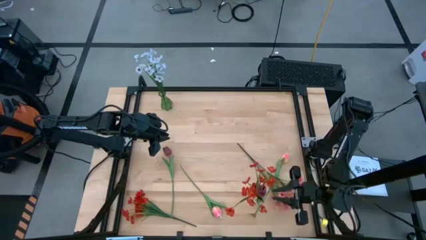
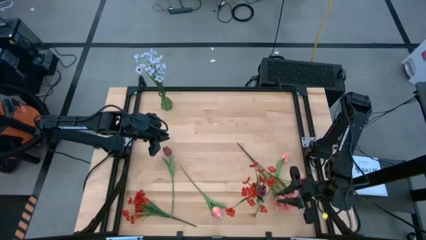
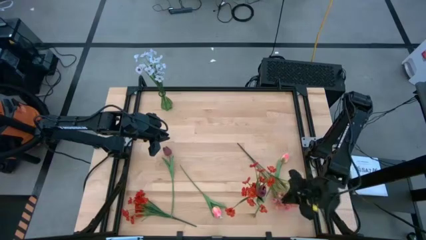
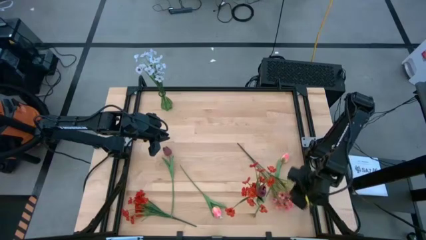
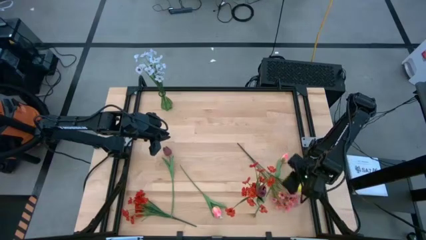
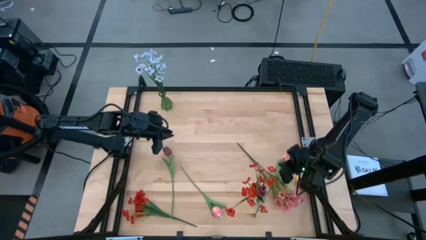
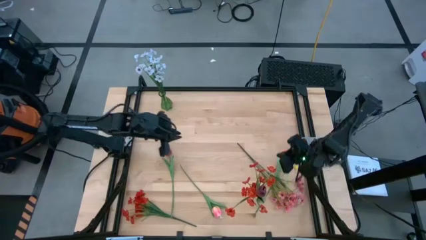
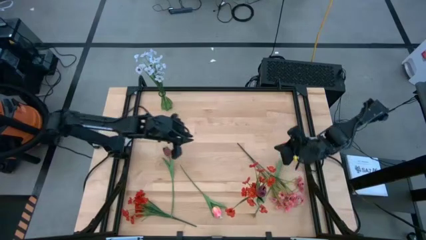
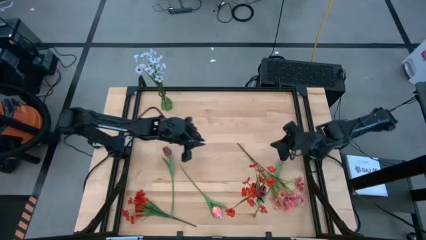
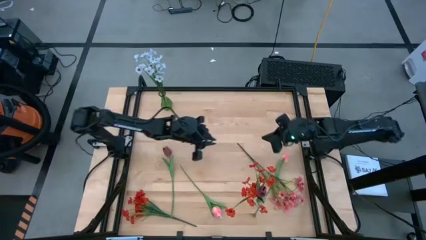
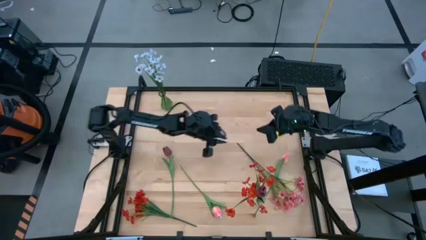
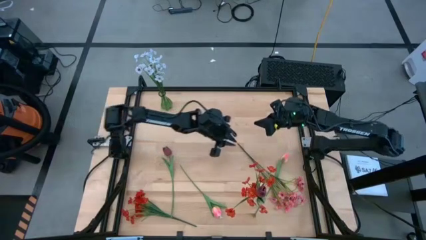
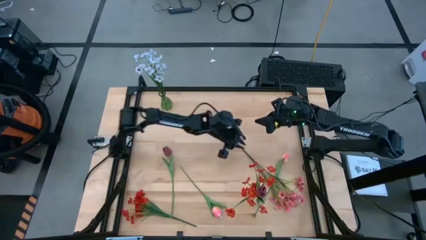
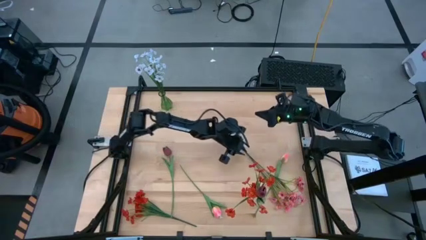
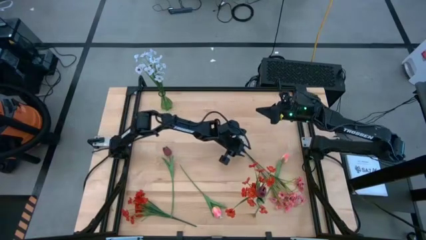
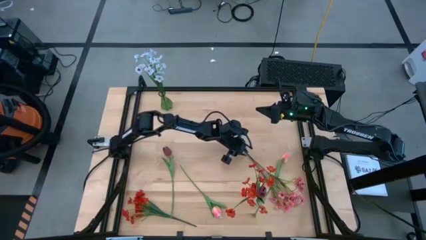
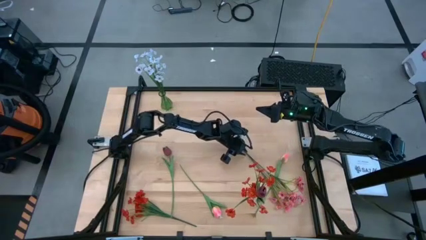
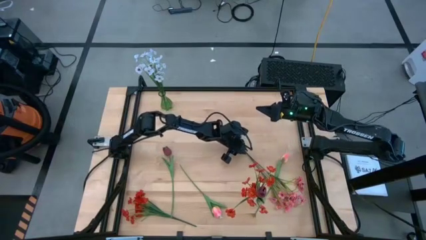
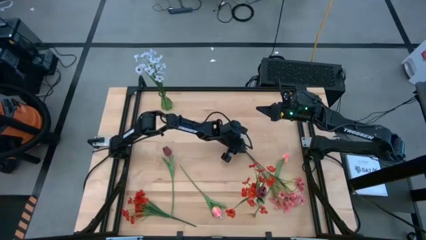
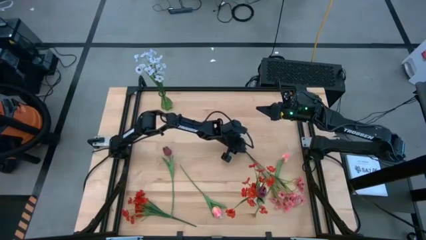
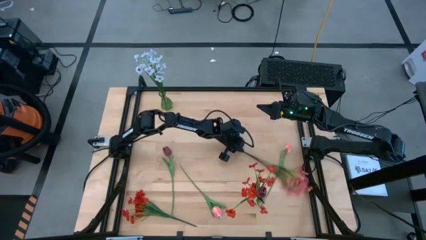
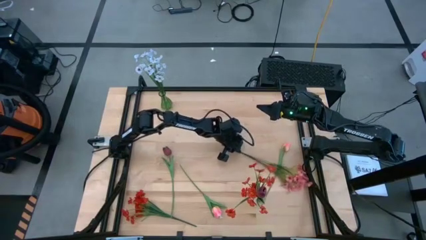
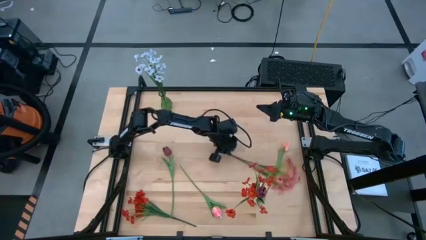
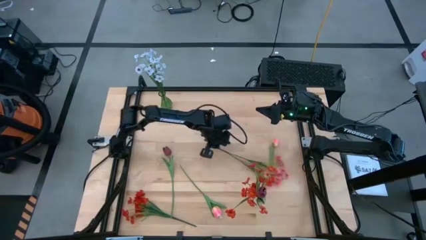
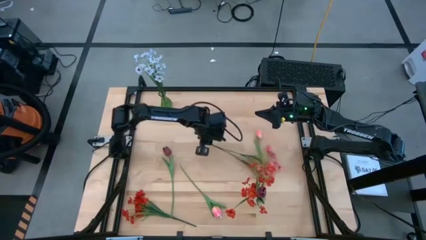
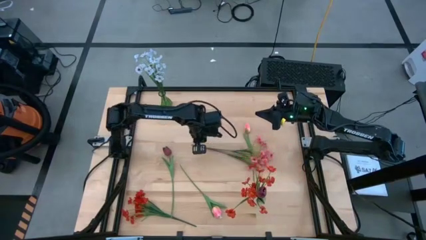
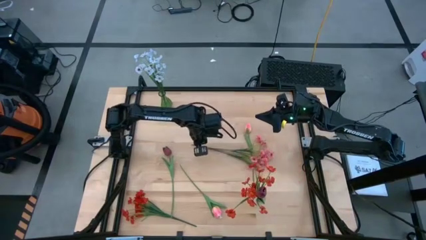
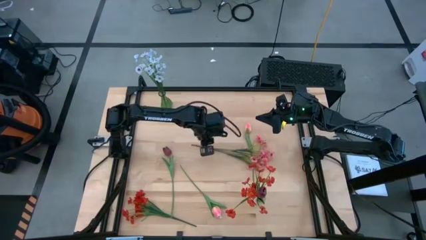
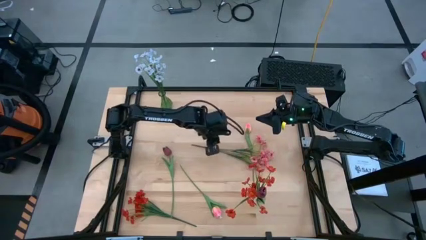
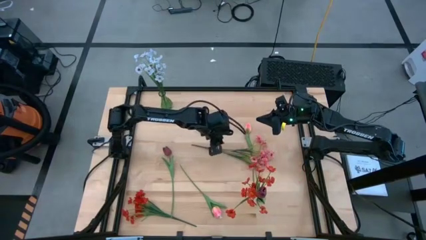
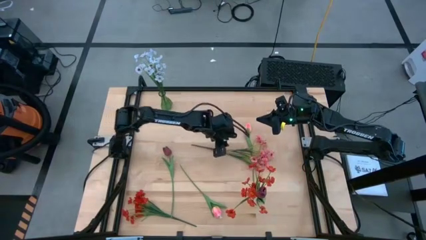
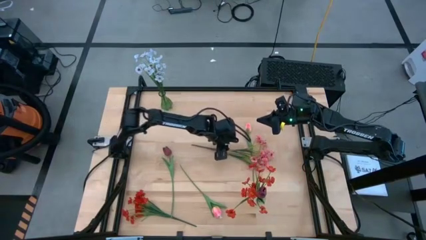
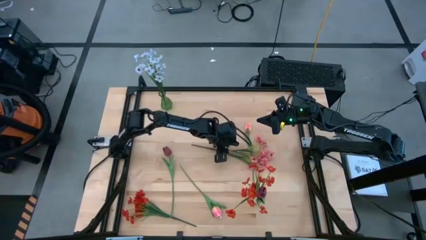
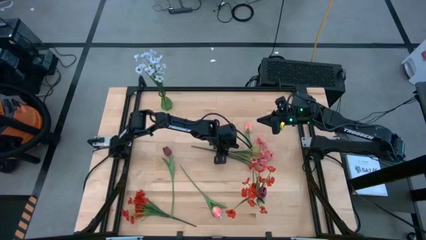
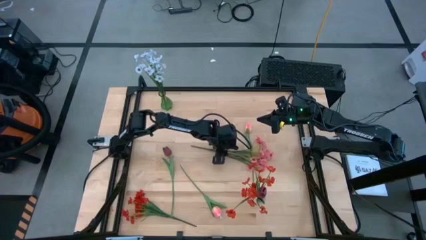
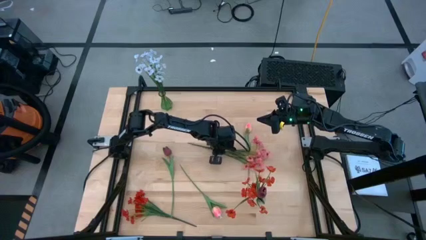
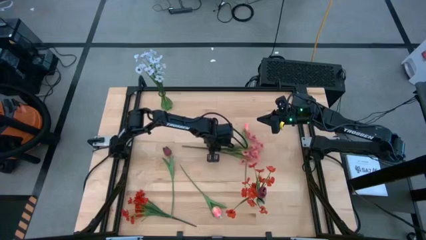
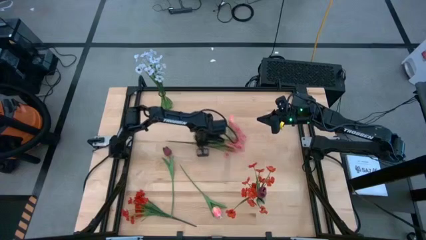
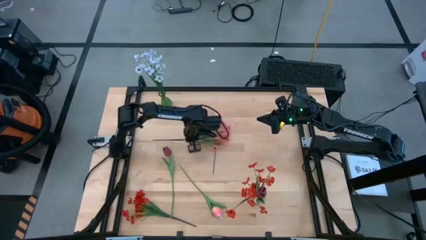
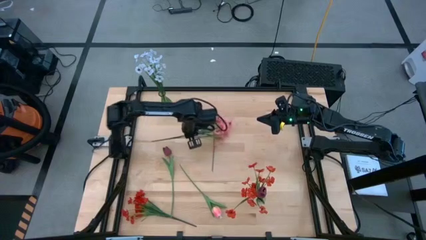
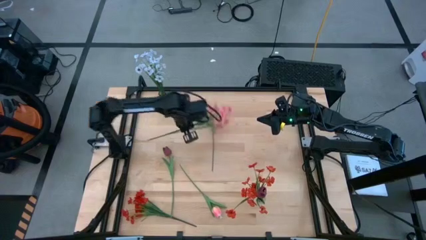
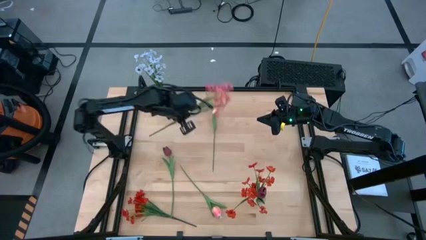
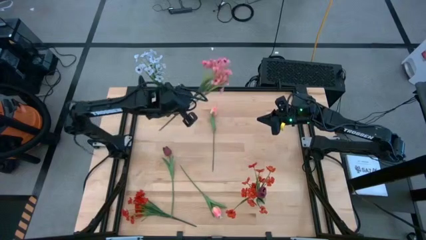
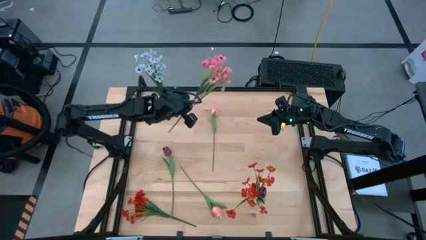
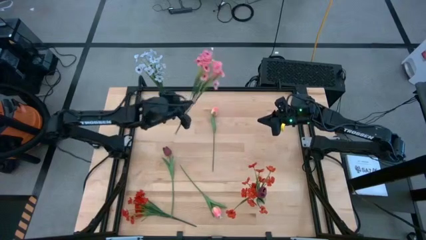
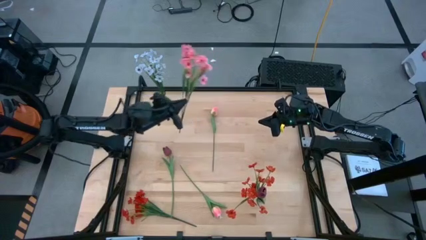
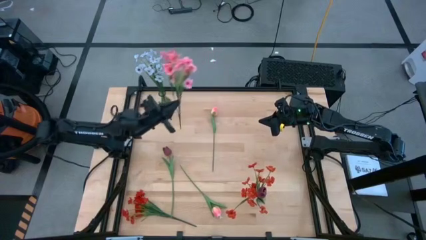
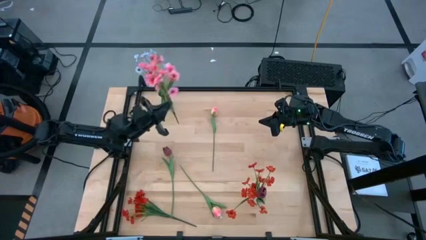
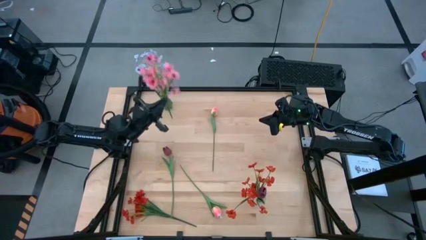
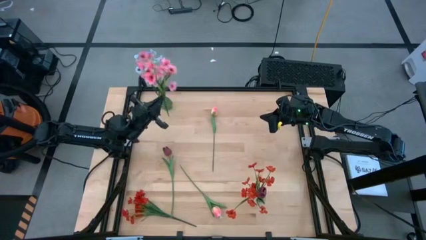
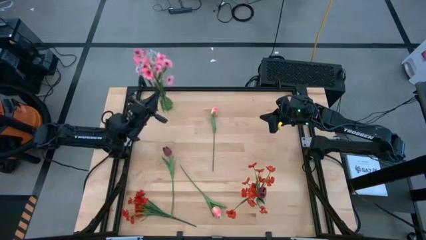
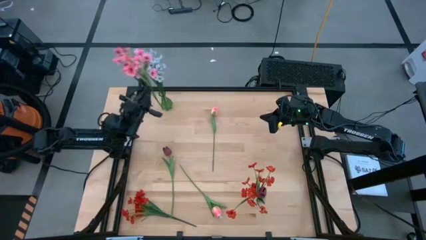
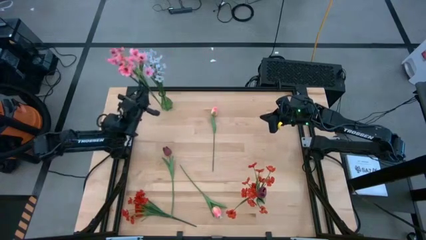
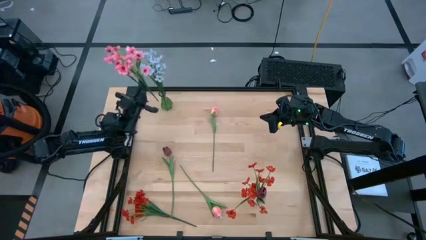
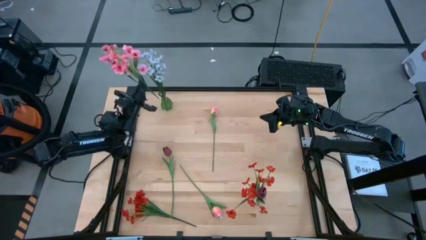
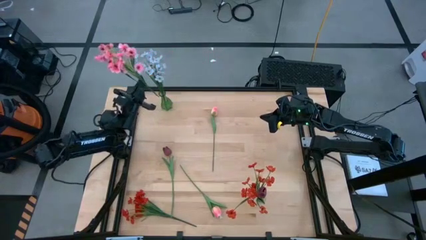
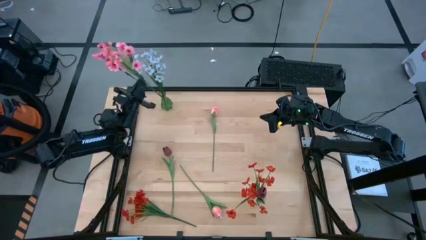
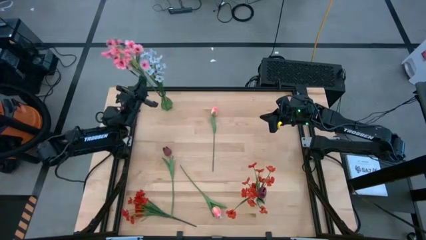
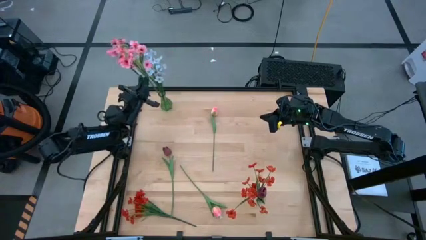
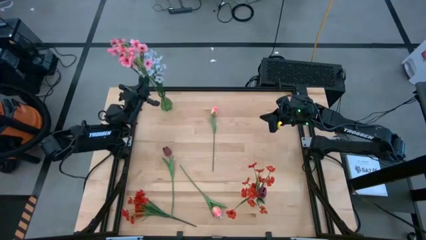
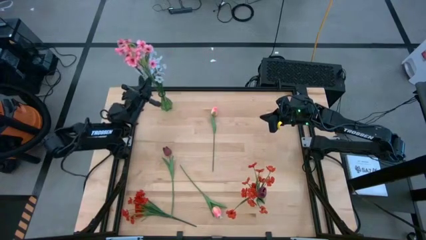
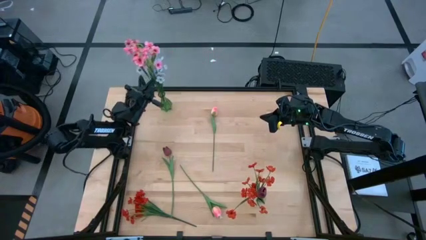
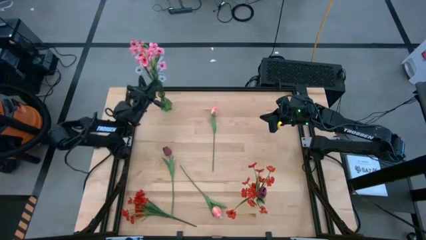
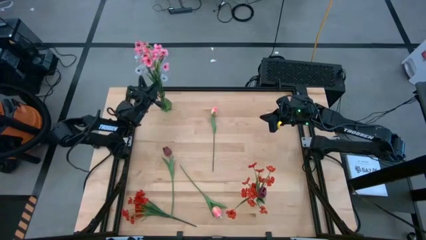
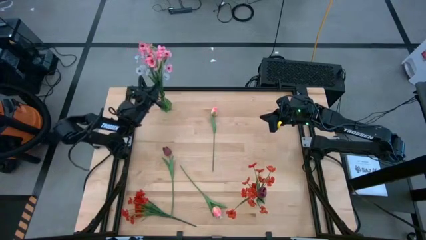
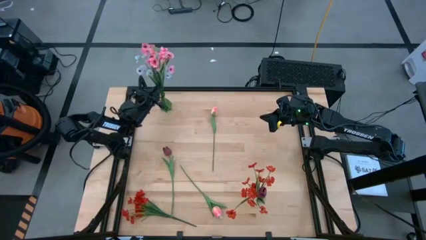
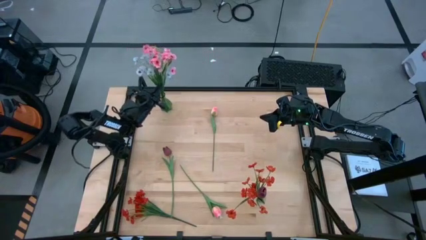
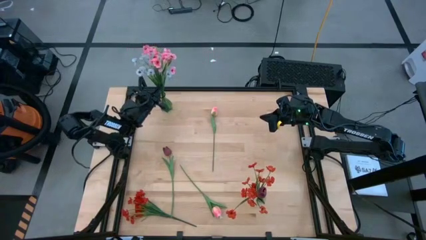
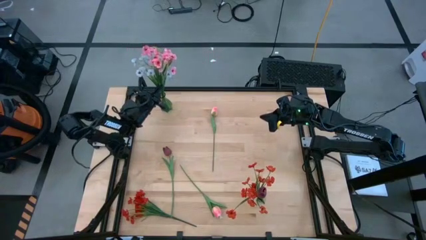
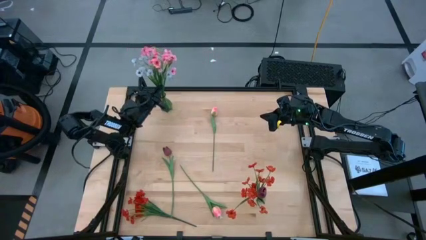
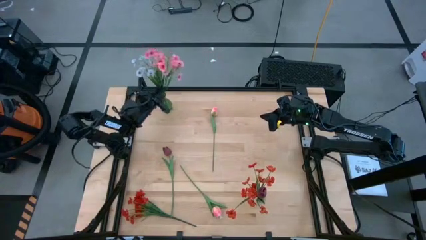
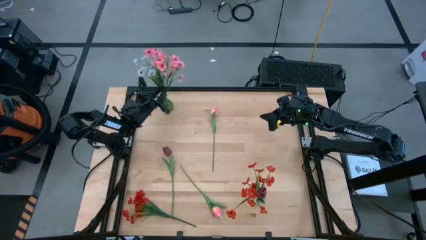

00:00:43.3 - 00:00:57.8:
Task: Sort flowers into vase by color
Put the pink flowers into the green vase
